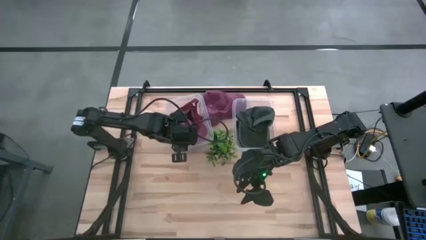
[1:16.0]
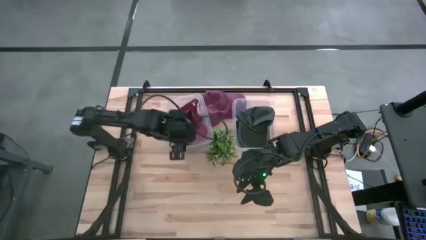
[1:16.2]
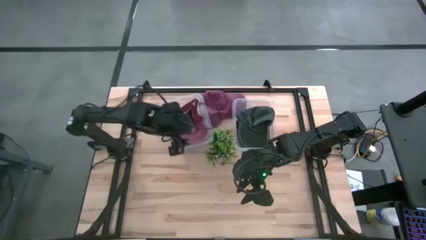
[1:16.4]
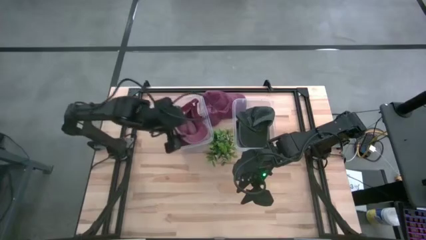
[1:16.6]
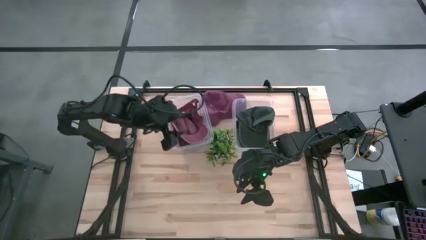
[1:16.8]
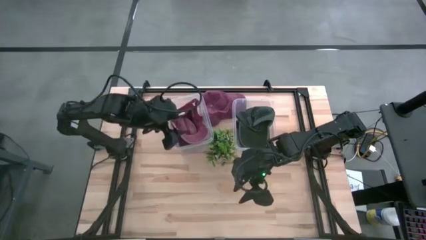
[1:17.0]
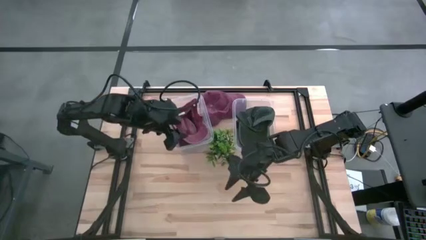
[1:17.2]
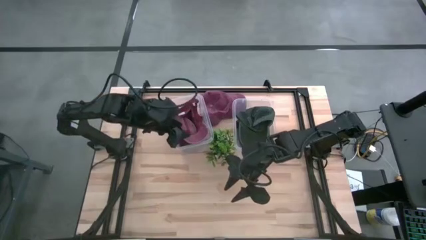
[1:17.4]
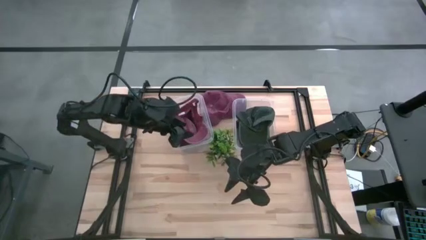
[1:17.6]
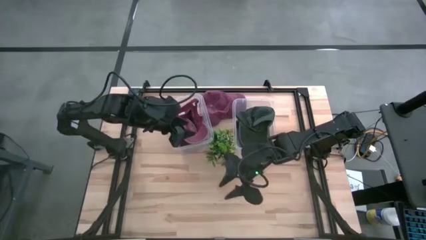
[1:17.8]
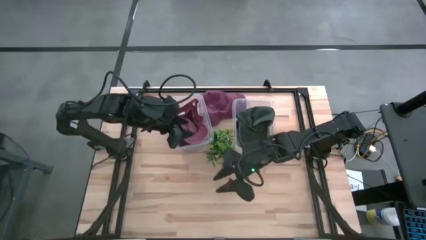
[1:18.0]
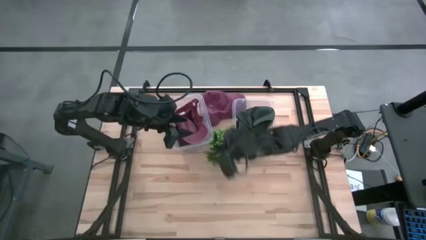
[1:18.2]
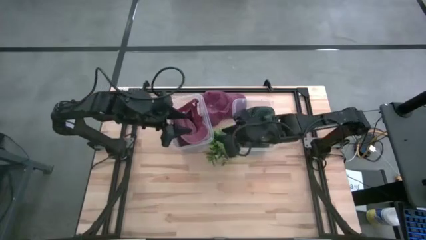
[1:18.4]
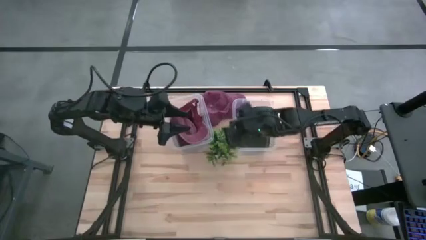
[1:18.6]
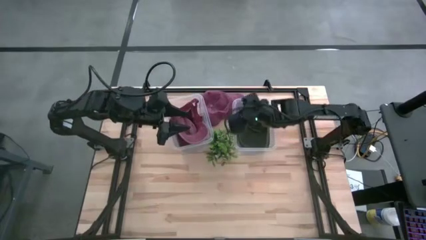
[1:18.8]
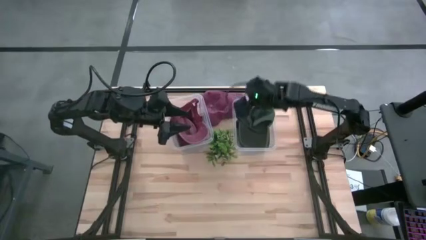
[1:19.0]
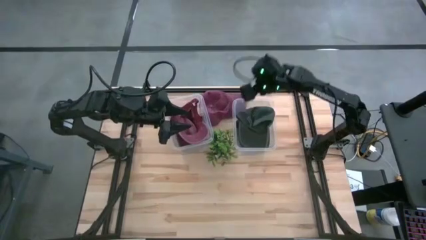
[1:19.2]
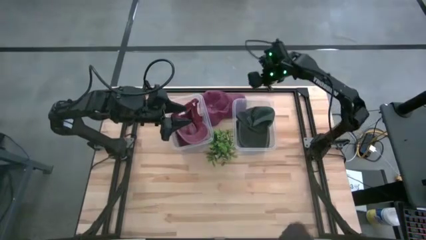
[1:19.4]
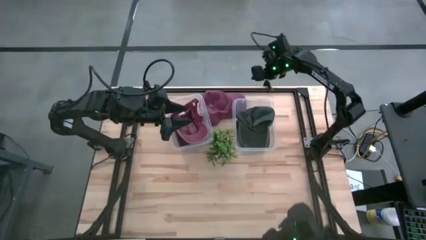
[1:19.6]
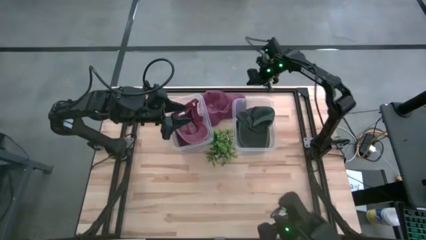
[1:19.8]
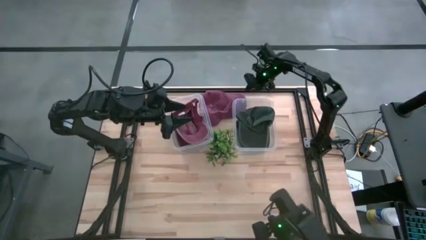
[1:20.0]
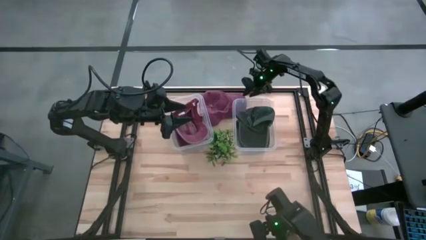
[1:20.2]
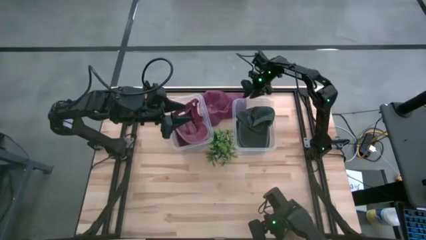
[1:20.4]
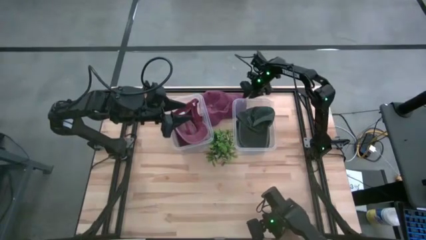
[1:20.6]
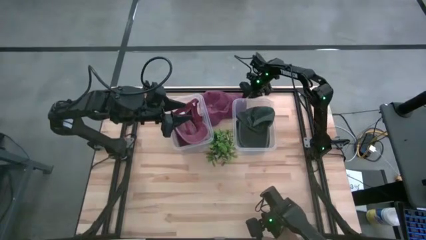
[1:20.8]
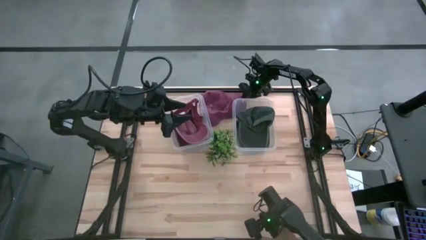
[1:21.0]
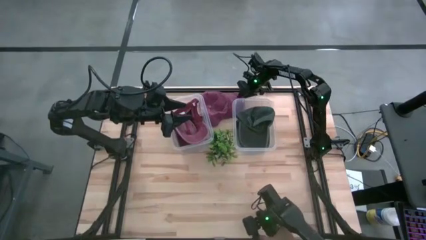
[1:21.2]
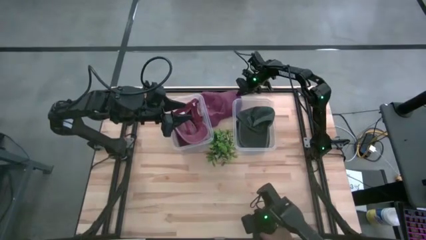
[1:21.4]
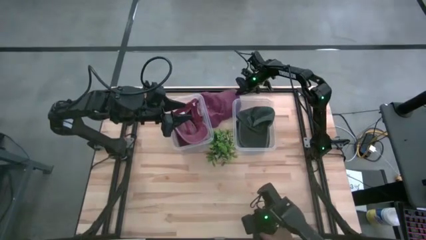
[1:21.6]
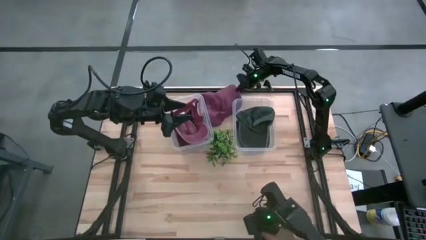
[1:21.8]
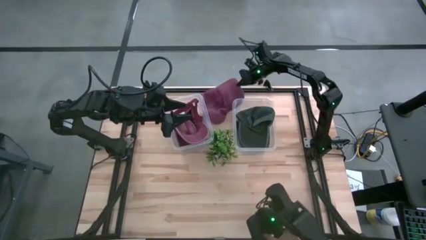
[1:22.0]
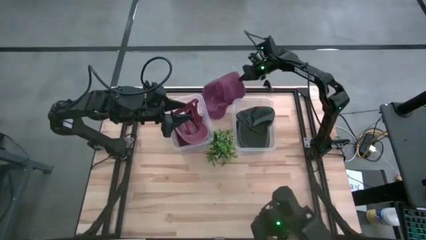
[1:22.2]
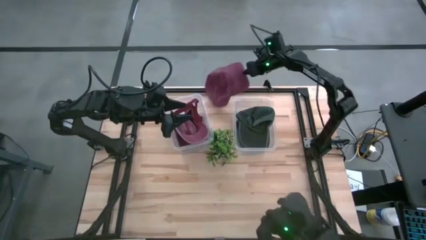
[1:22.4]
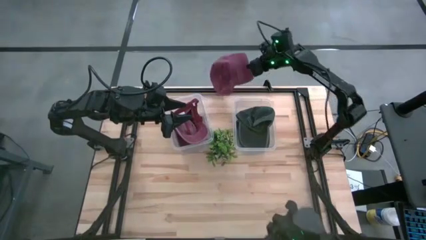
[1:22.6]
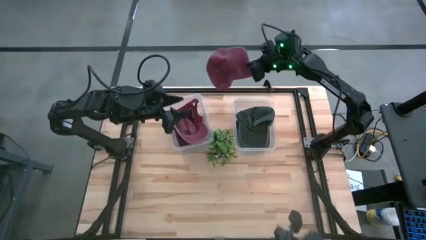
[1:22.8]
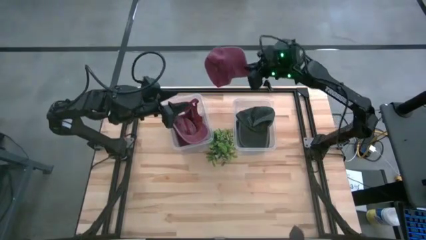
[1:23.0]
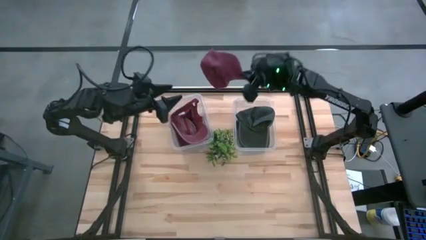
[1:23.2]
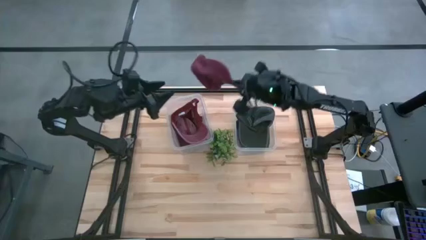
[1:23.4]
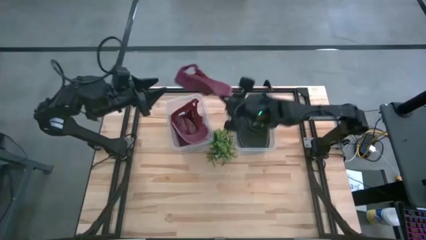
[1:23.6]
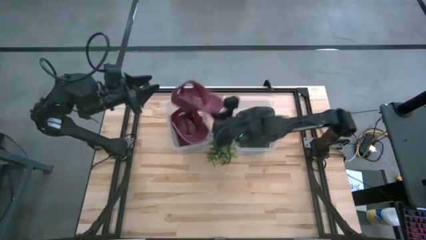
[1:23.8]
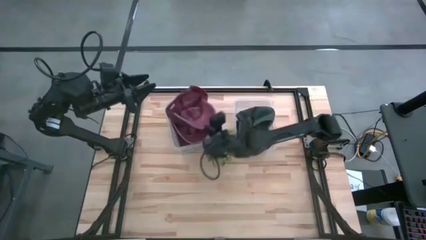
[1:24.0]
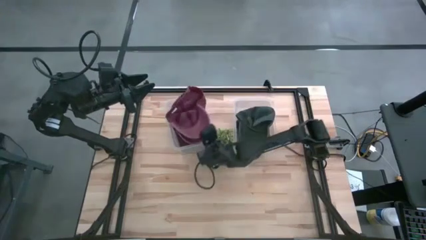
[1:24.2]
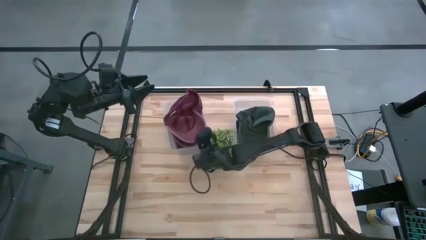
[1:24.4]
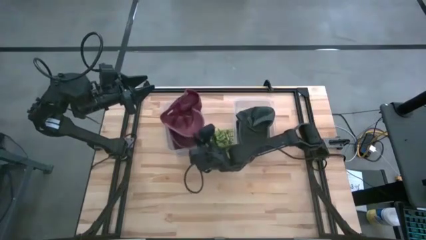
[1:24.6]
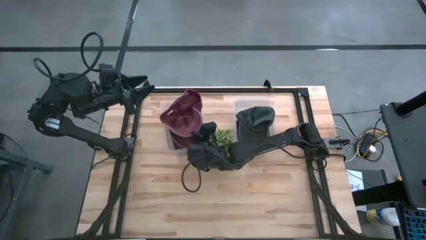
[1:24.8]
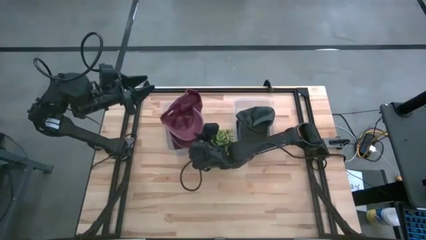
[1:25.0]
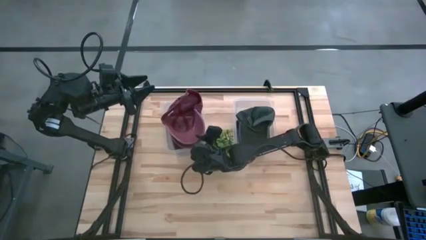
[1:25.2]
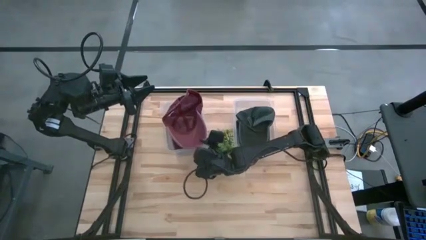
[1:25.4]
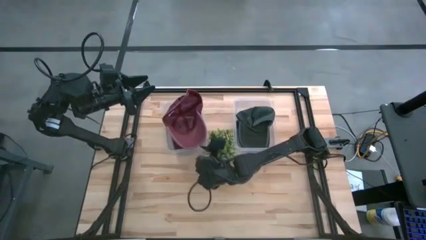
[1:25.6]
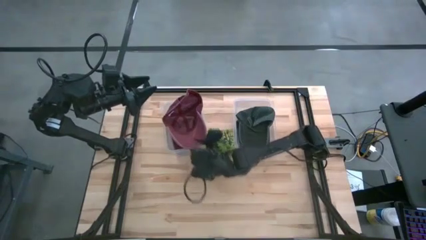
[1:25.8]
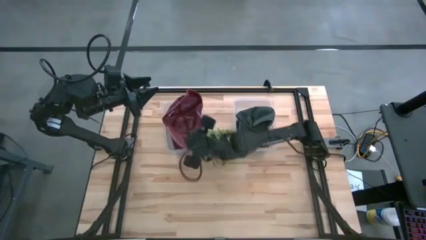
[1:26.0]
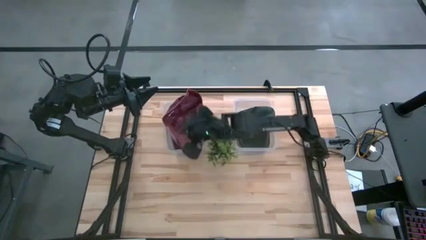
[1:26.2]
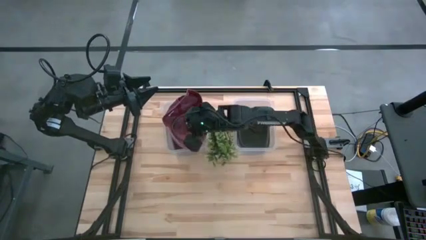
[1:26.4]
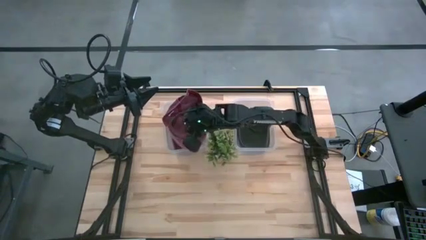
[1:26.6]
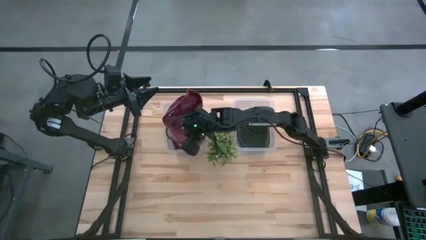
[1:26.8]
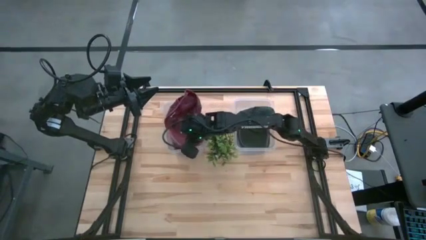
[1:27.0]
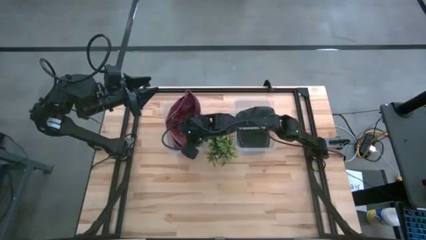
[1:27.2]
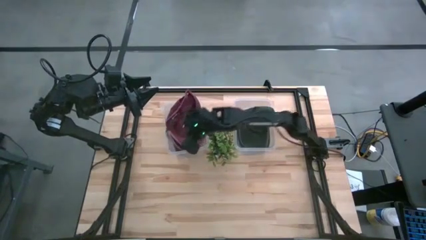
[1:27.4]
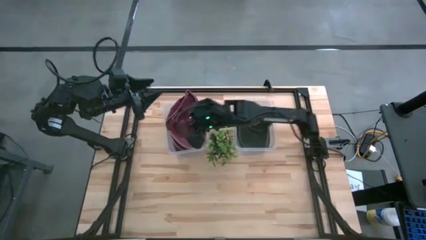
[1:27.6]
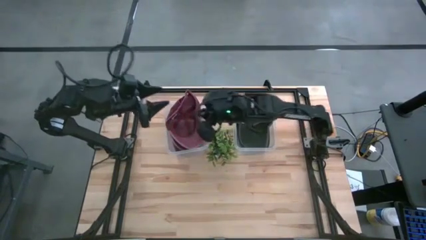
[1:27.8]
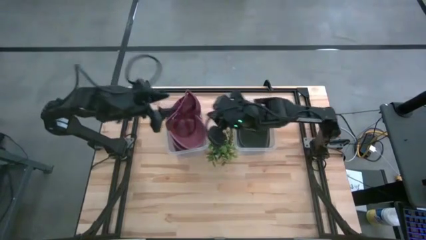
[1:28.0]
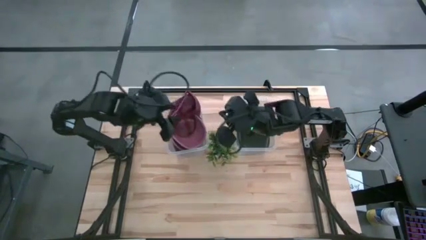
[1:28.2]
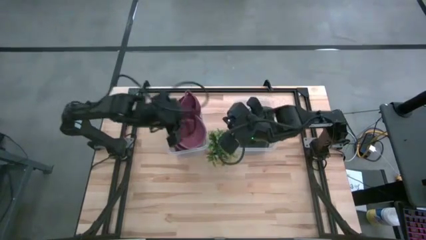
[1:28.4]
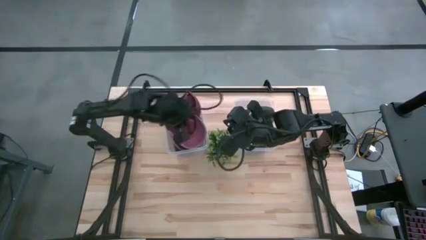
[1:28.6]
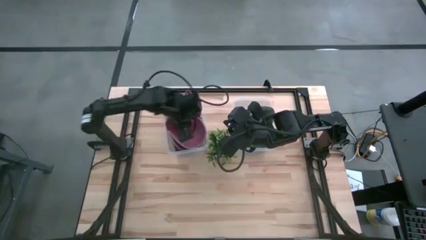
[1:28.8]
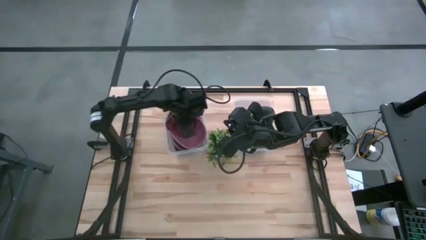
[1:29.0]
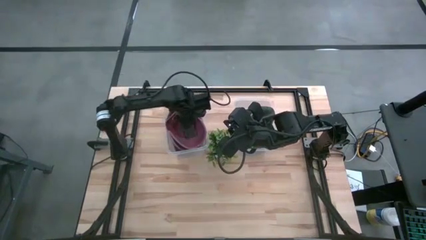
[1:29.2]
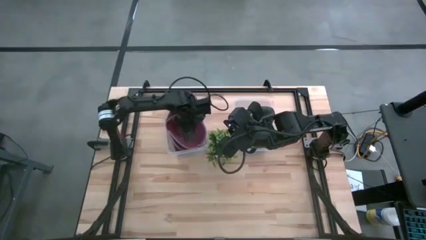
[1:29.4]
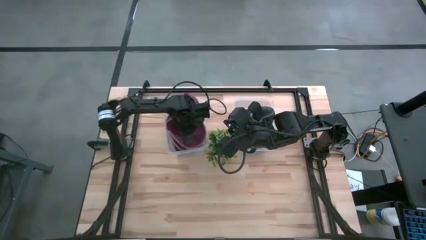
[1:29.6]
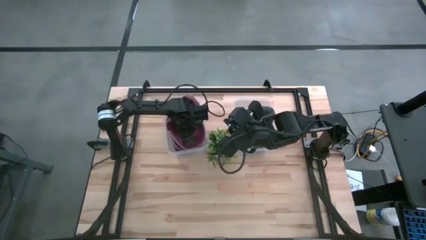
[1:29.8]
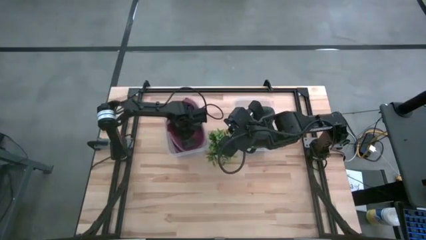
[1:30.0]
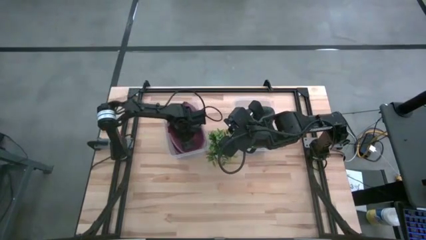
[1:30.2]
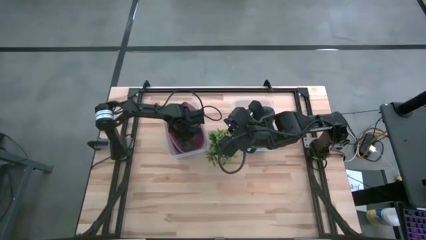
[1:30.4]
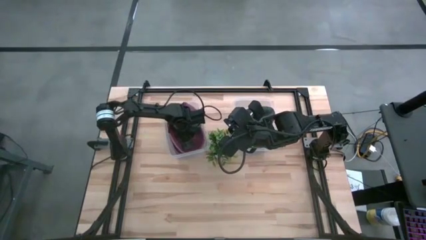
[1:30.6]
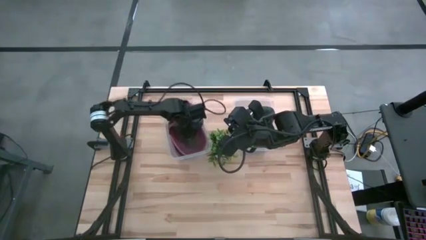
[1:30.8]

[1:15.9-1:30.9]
Task: Pick & Place hat
Put the red cap into the left transparent bin

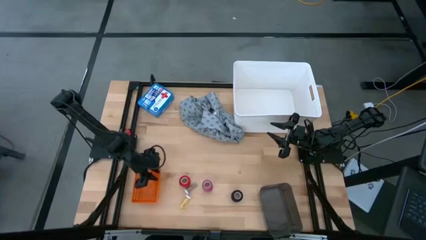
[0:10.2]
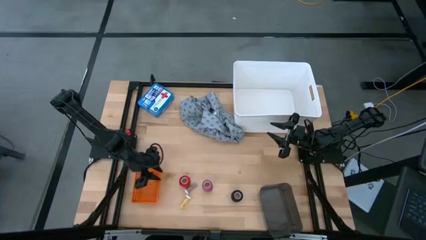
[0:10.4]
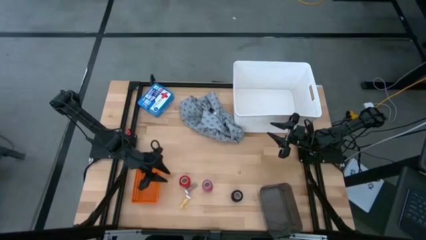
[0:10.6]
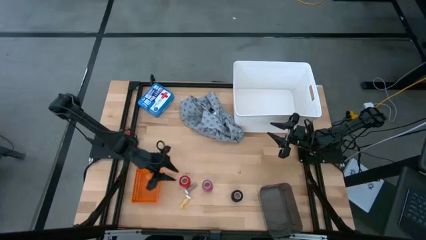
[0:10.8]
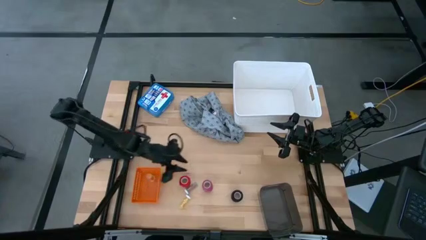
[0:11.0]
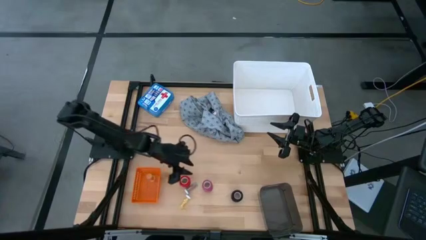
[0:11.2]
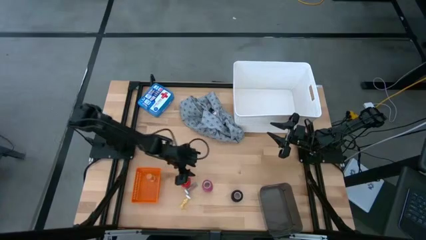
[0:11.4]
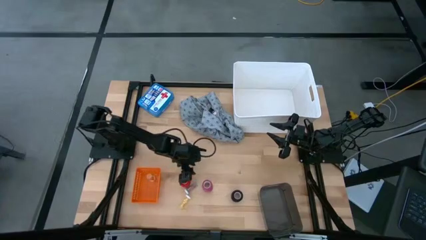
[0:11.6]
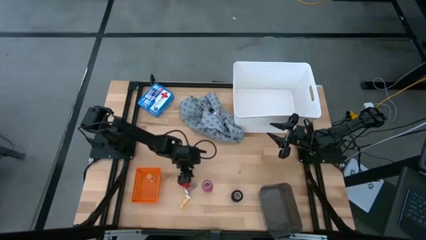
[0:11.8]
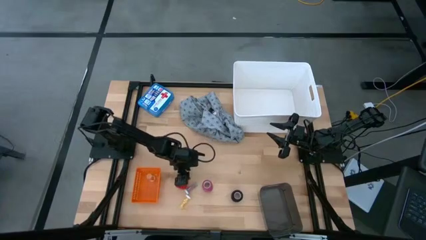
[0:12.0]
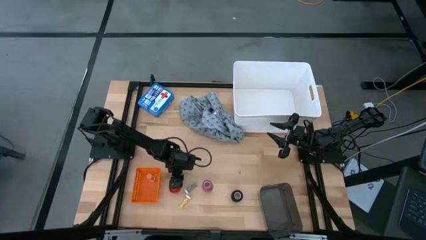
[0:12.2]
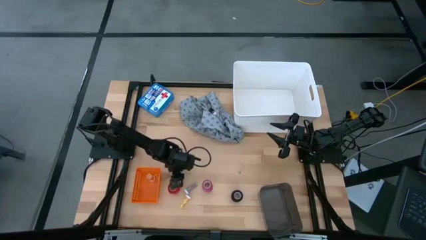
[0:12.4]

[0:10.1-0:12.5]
Task: Pick & place medical supplies in basket/bin
Adjust the red bandage
